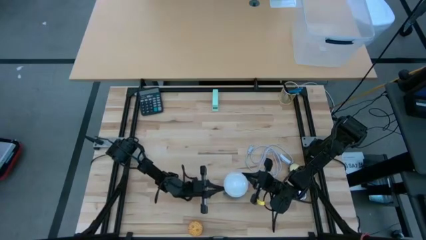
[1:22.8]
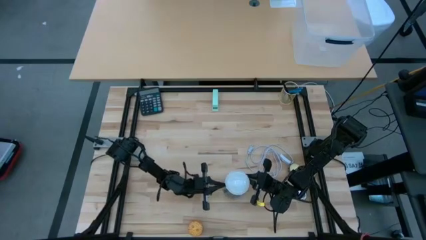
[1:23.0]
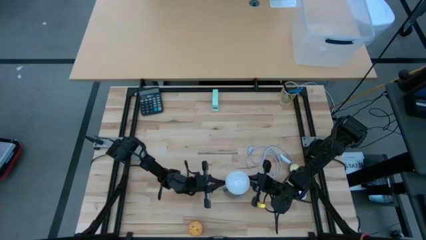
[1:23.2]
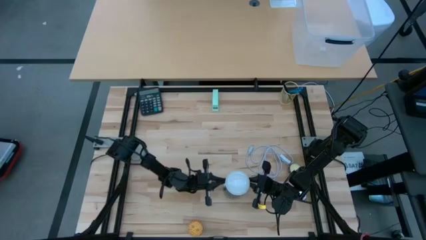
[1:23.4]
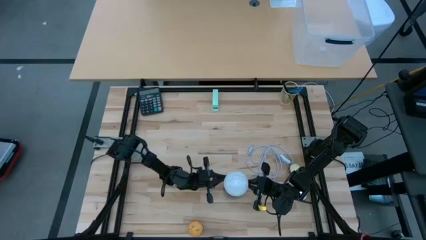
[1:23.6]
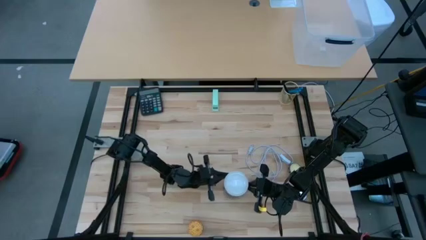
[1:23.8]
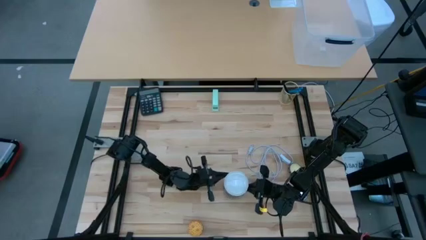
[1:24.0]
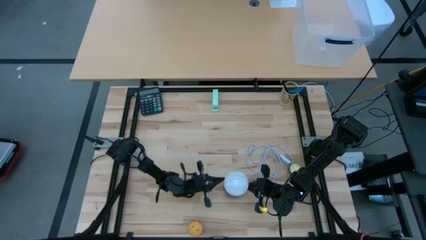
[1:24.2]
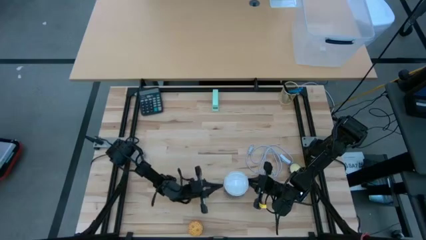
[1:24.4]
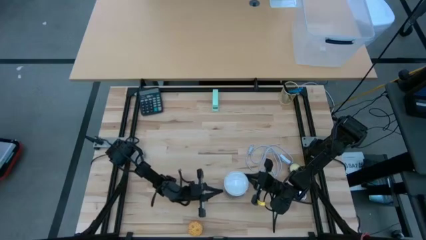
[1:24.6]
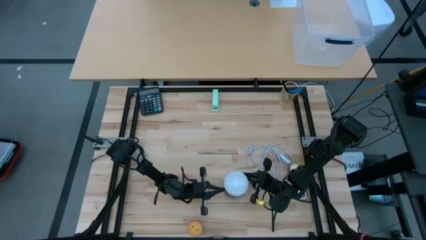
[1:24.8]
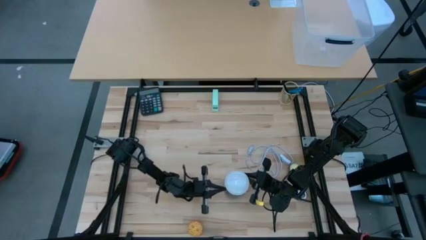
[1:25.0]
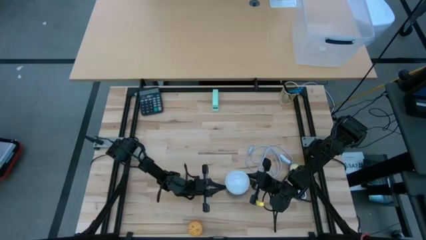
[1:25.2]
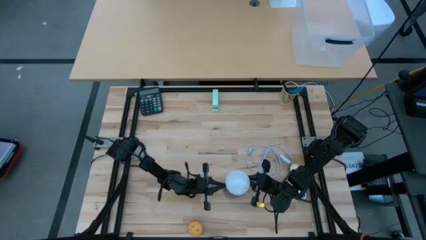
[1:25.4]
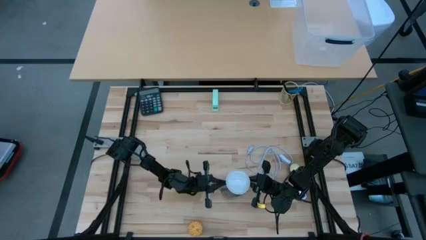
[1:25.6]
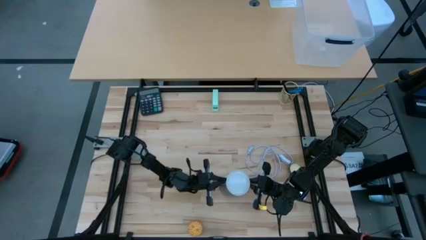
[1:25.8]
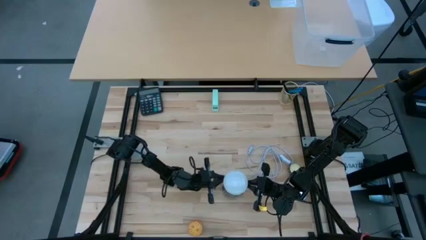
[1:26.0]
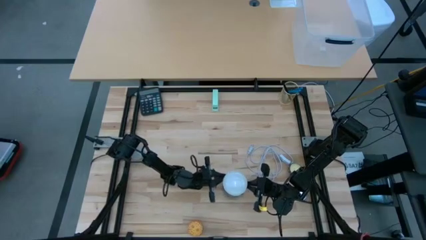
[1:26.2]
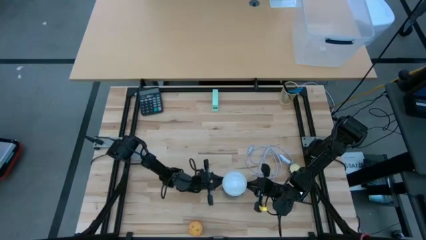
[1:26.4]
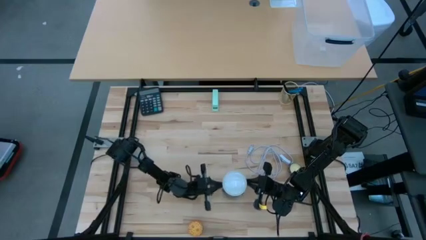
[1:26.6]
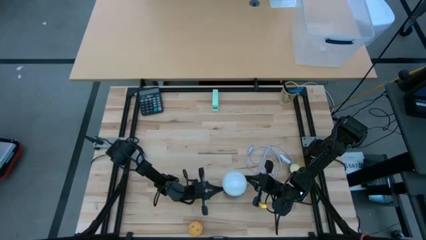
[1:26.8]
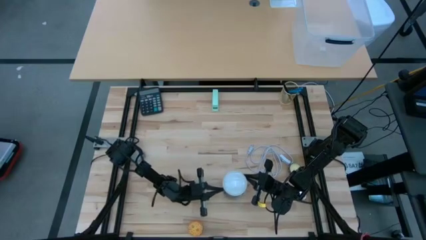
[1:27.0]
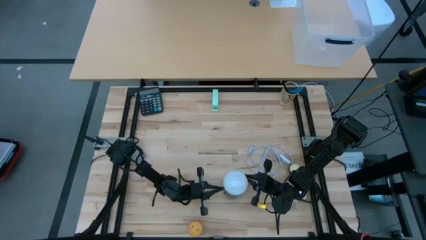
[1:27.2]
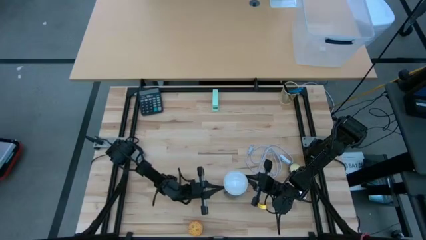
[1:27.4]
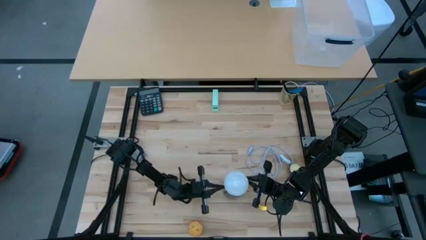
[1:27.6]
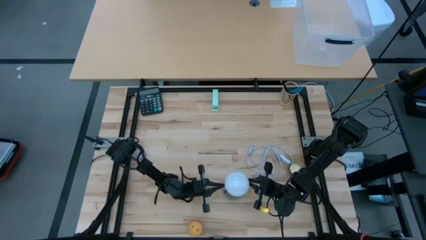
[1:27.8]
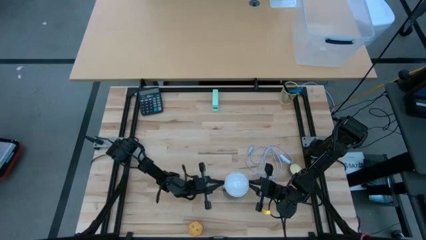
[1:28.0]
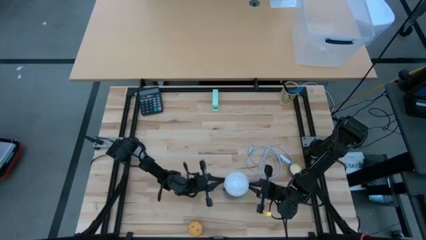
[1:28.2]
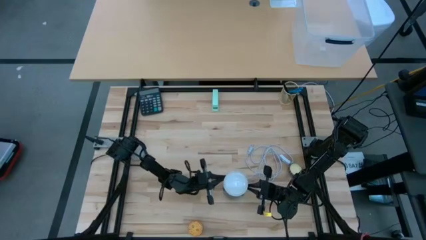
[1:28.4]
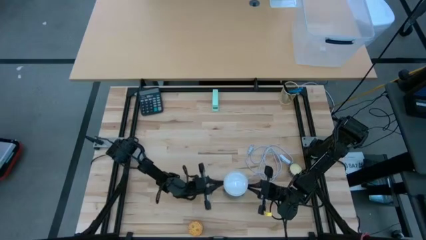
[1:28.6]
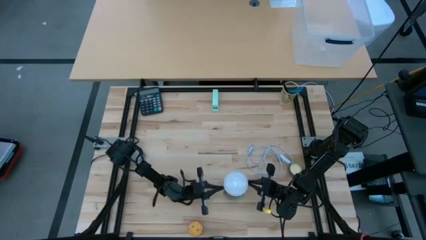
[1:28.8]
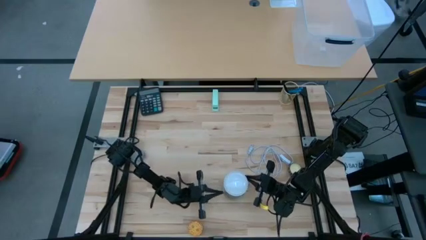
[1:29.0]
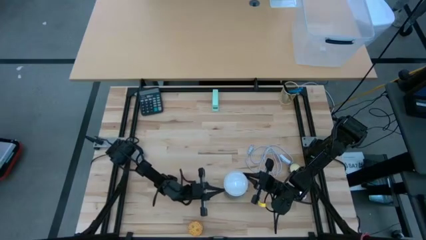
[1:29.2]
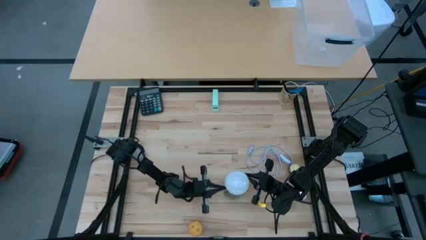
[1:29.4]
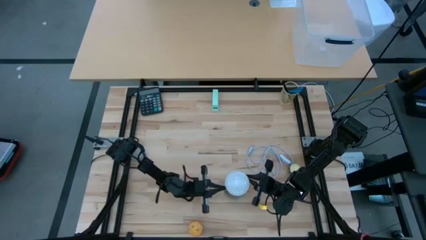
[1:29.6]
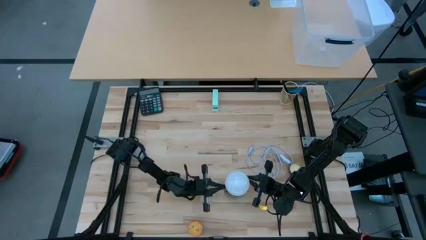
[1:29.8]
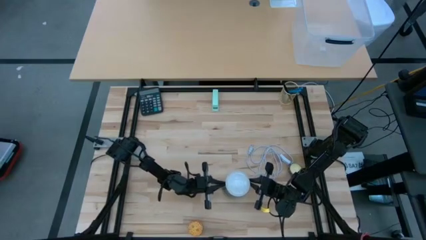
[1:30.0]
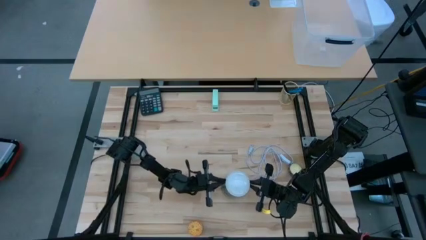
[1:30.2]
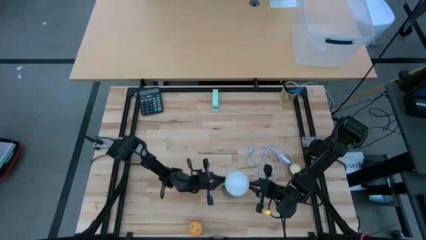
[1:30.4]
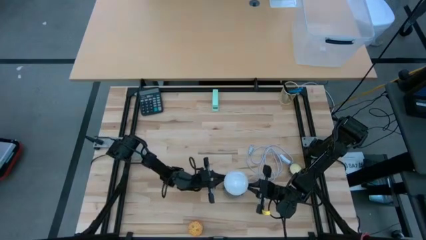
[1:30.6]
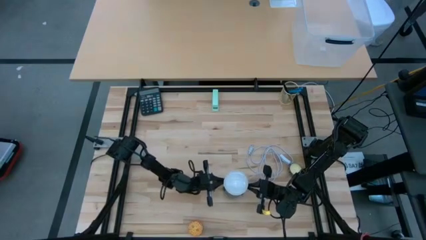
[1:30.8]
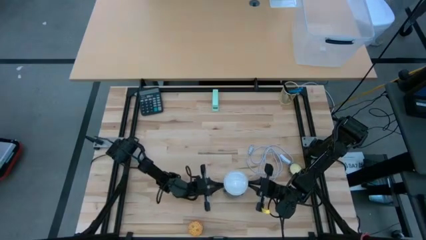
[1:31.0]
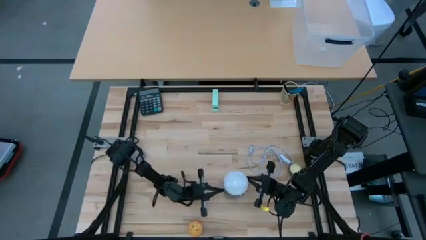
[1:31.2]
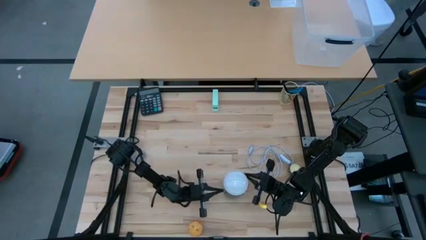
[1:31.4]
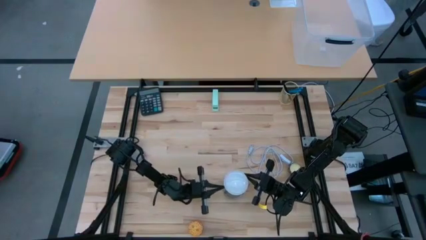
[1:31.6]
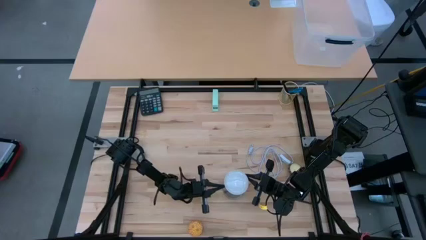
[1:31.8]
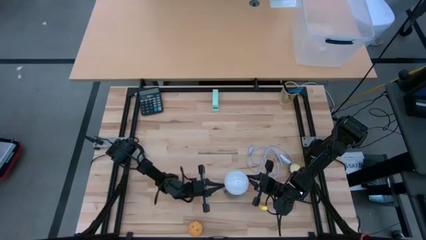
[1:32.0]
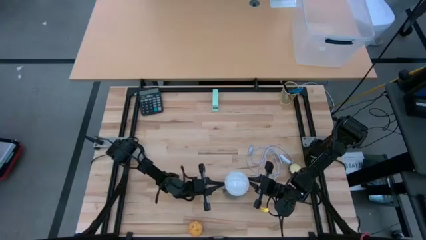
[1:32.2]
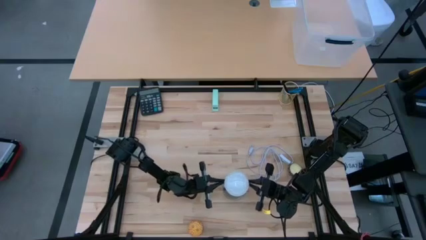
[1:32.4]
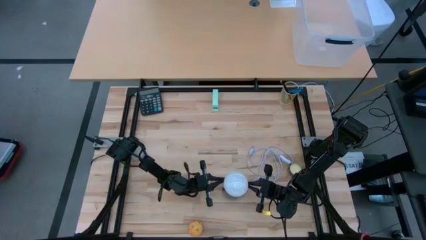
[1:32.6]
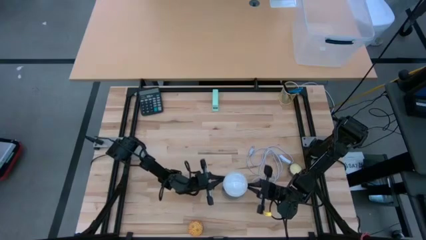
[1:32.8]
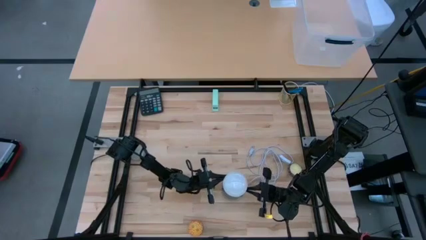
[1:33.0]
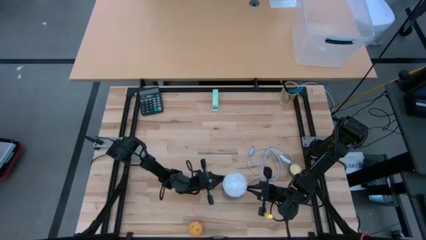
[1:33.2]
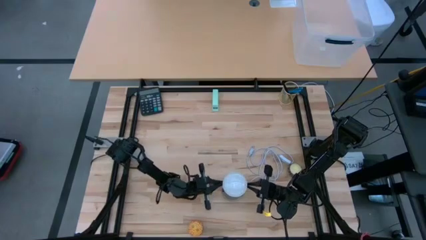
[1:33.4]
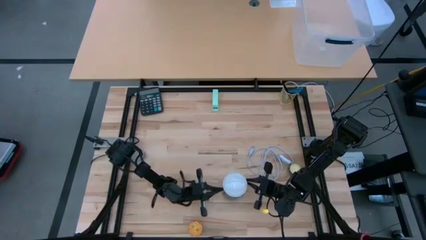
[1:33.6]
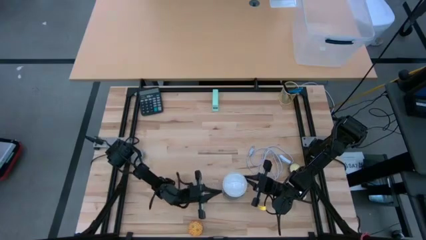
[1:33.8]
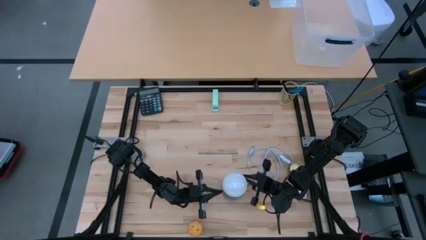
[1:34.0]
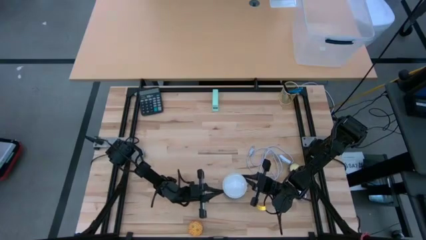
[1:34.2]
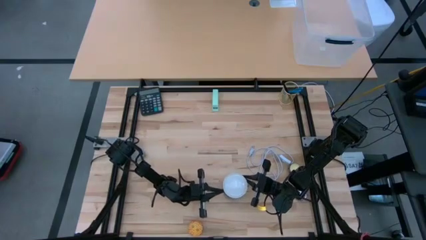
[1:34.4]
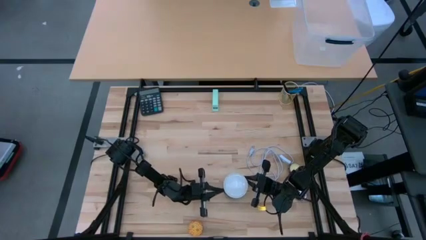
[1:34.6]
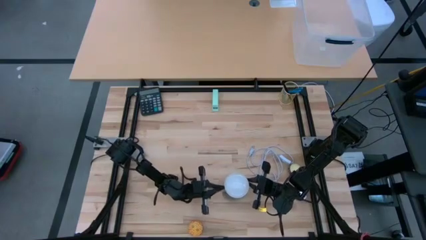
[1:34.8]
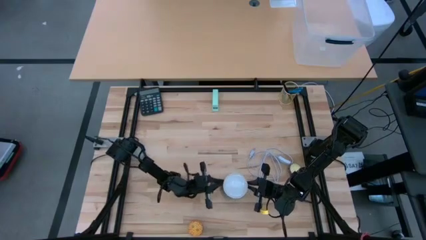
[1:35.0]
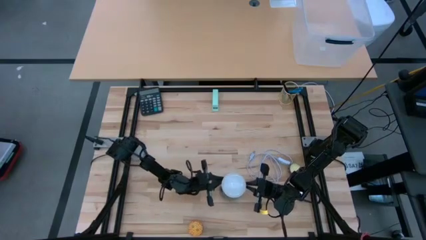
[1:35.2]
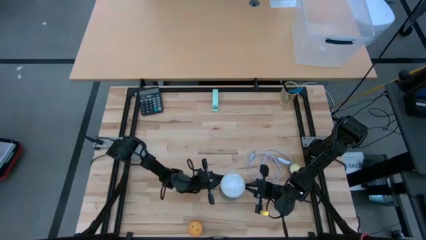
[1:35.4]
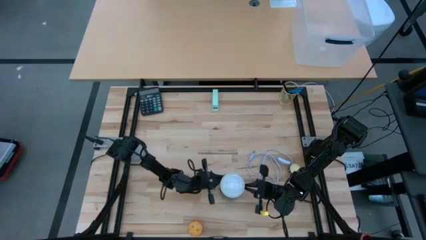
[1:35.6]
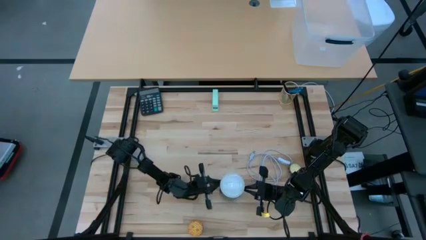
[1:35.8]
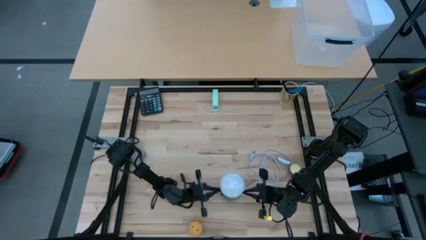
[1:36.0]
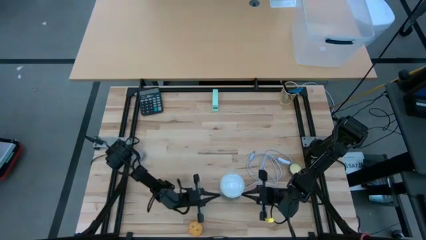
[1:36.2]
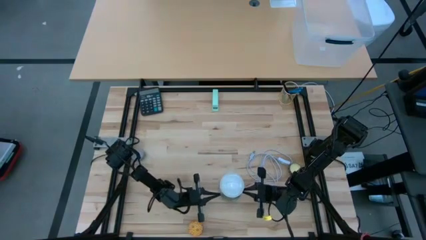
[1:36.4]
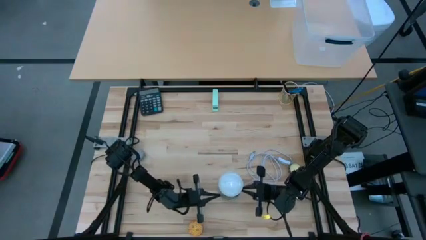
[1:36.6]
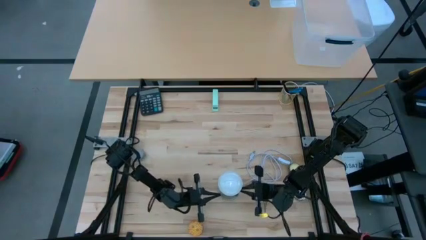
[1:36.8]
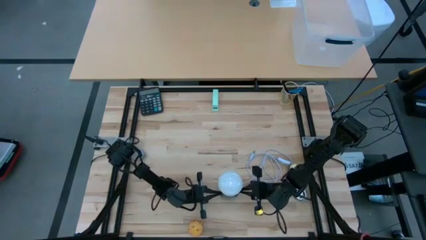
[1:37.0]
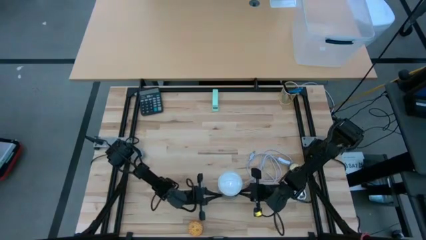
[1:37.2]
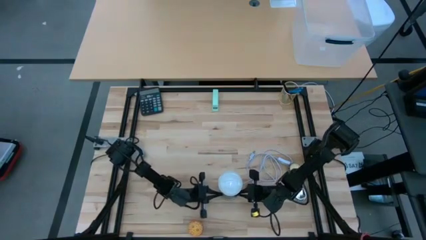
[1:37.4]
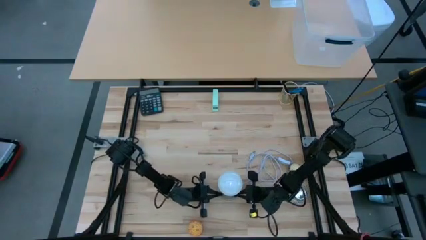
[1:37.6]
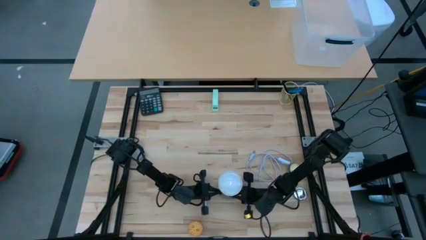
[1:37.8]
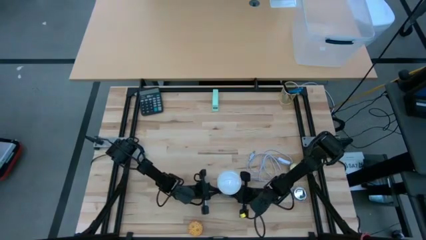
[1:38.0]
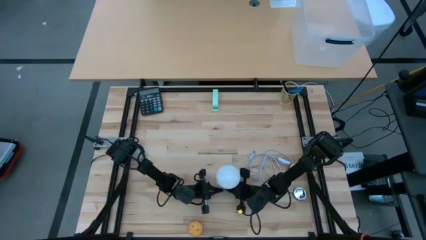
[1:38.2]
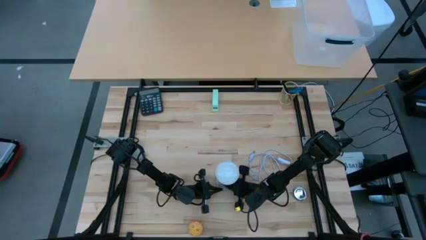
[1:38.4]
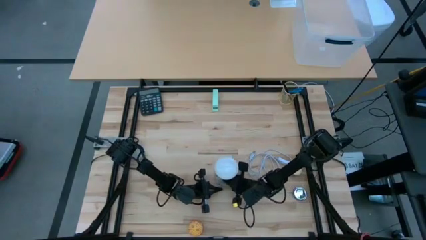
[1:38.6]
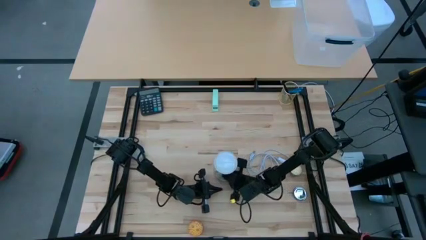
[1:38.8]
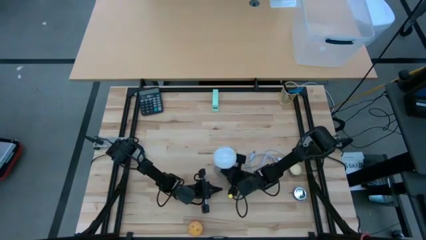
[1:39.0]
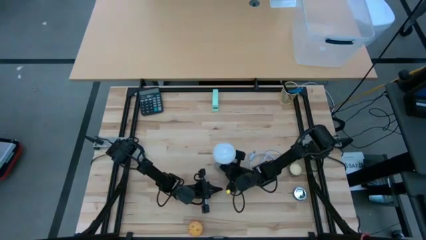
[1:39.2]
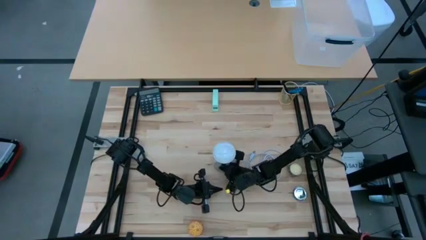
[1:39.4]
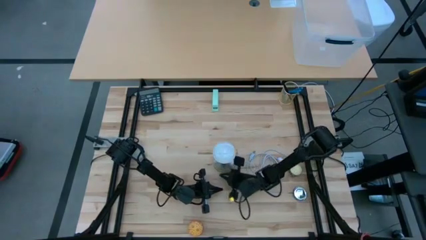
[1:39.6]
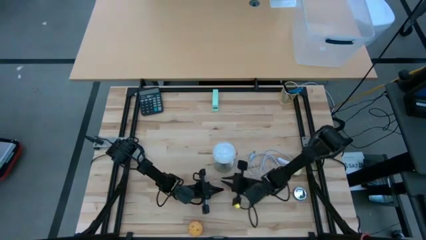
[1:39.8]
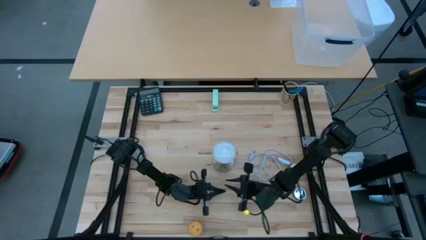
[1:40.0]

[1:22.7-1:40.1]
Task: Screw lightbulb
Insert the white lightbulb into the silver lamp
